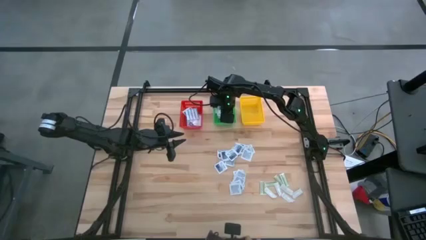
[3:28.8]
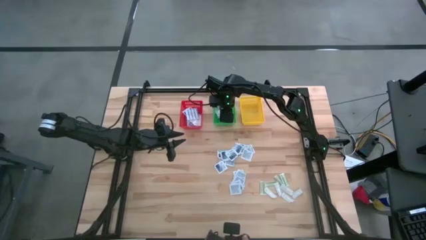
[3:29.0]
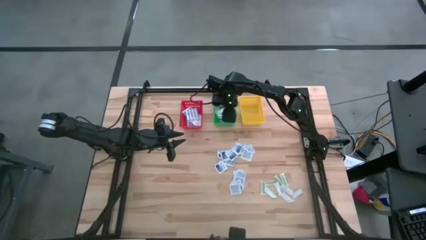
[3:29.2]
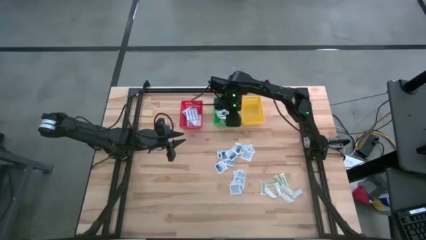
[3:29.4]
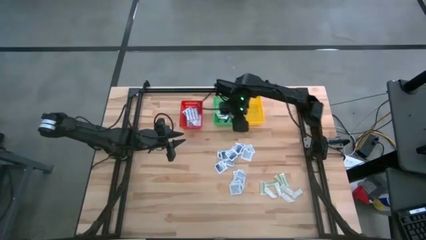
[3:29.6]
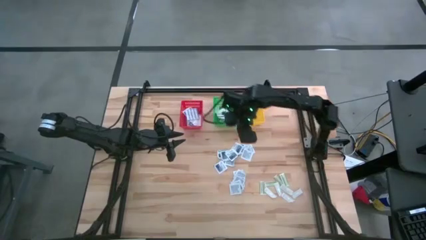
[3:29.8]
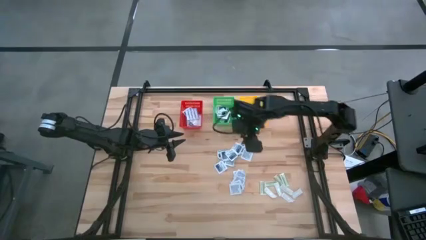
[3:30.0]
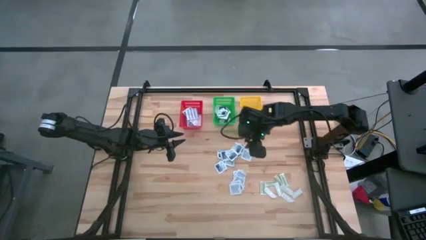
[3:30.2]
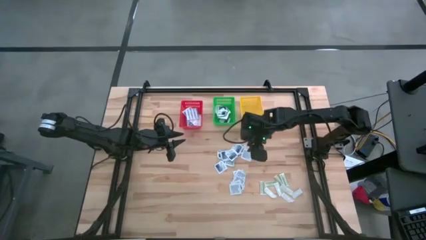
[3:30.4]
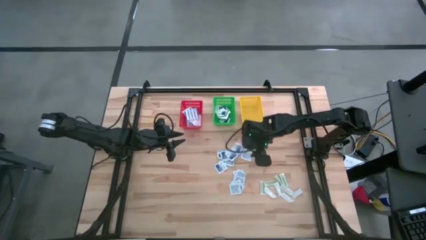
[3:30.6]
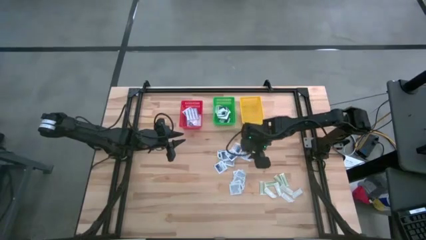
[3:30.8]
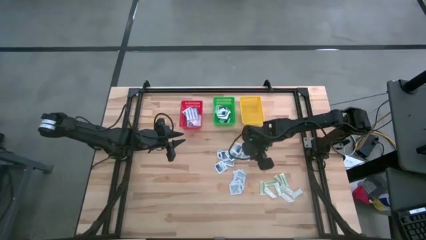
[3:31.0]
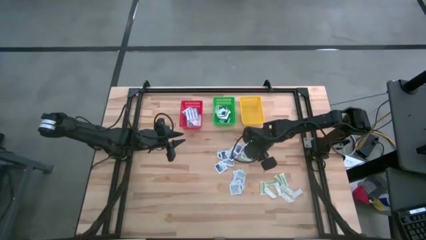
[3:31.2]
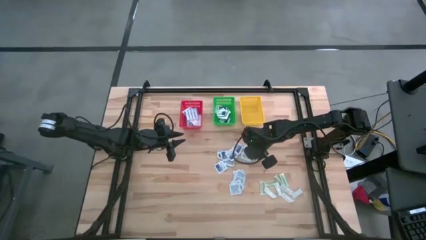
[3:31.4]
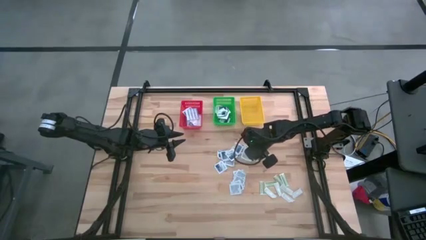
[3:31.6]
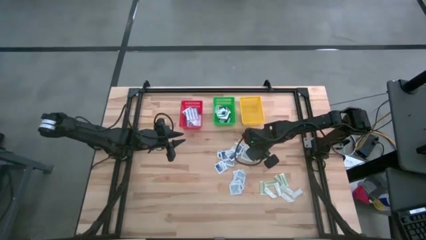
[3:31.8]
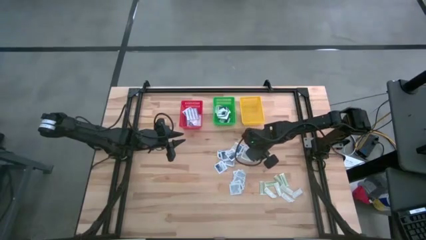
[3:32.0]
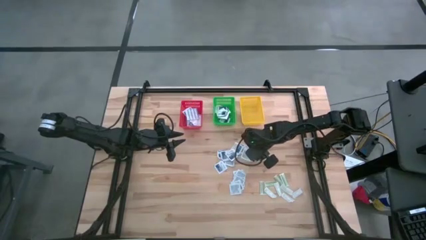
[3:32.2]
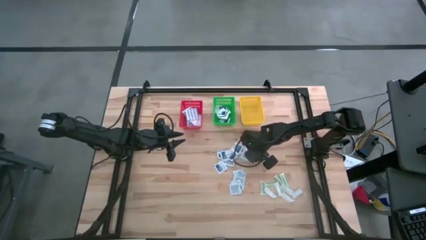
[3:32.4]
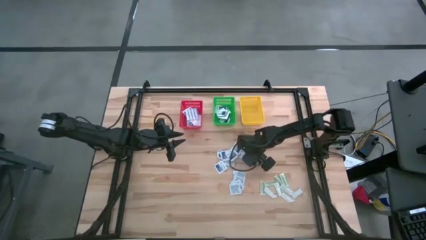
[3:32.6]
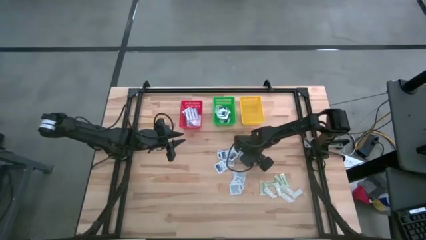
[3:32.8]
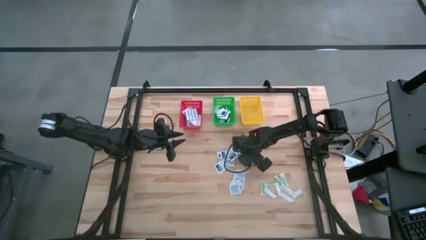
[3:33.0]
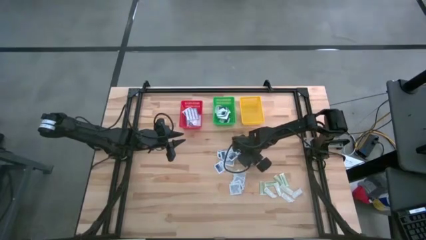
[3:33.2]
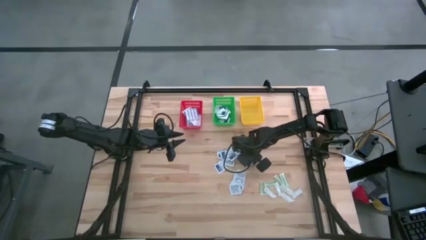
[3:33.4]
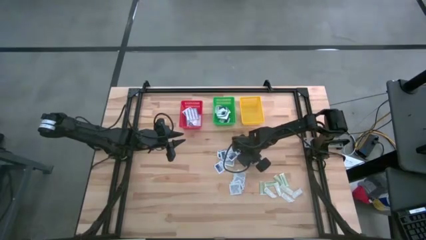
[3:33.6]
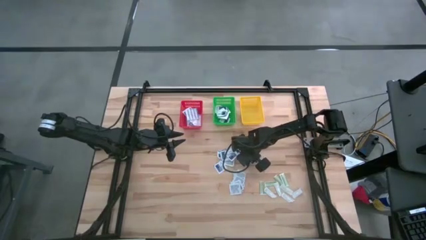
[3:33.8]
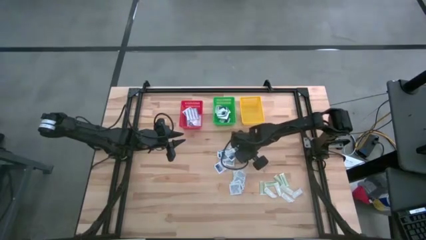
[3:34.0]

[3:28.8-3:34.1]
Task: Pick & Place First Aid Supplies
Put the alcohol pad into the green basket

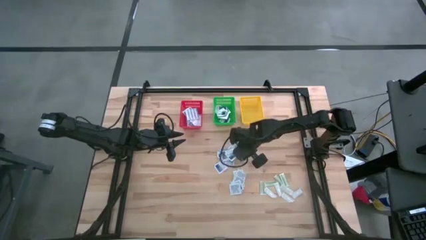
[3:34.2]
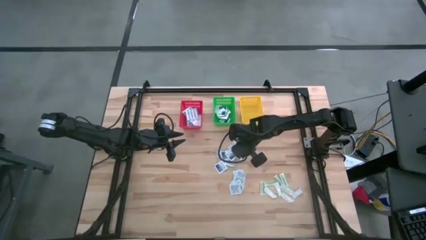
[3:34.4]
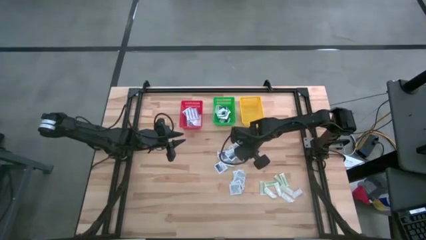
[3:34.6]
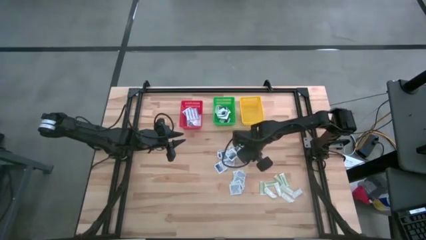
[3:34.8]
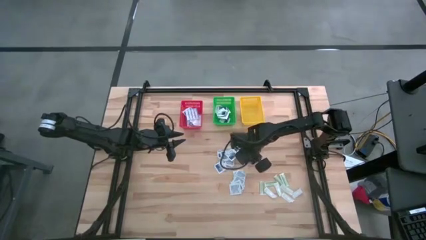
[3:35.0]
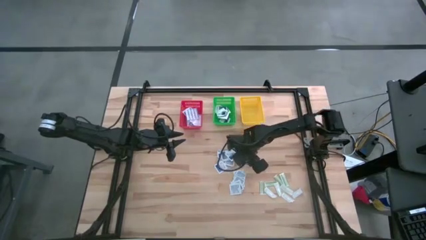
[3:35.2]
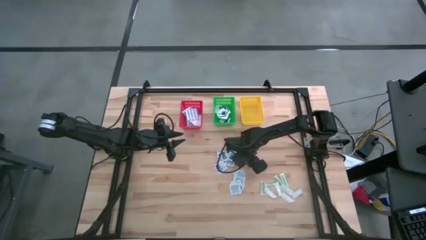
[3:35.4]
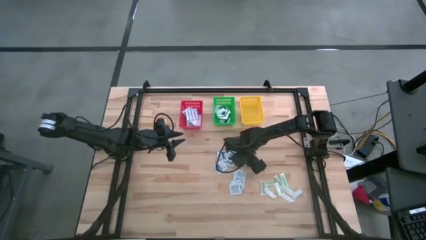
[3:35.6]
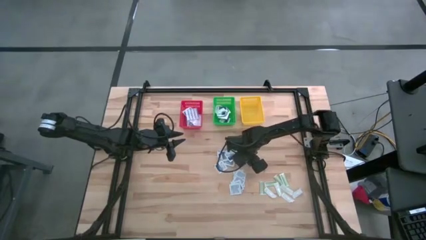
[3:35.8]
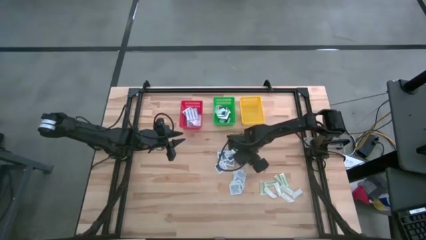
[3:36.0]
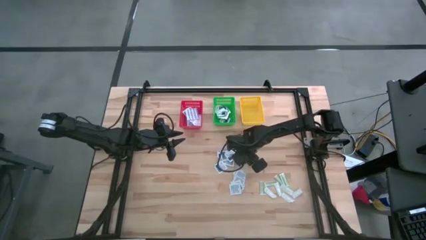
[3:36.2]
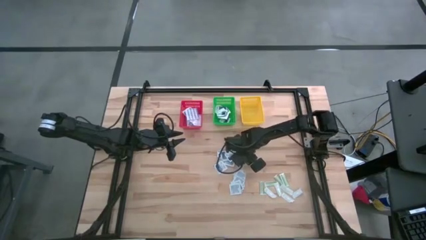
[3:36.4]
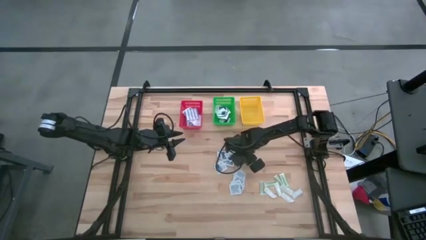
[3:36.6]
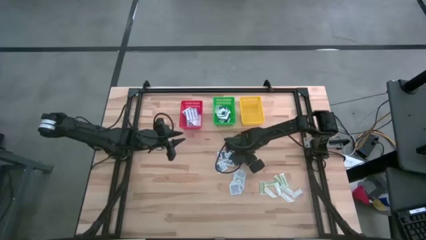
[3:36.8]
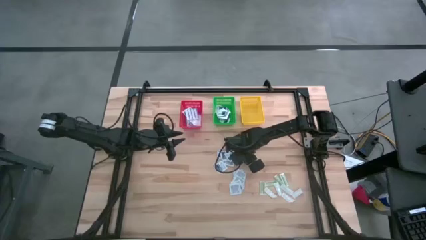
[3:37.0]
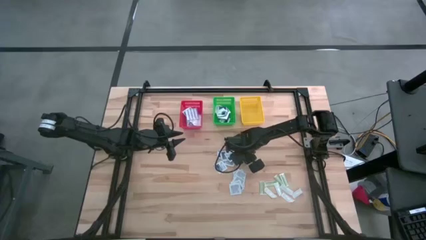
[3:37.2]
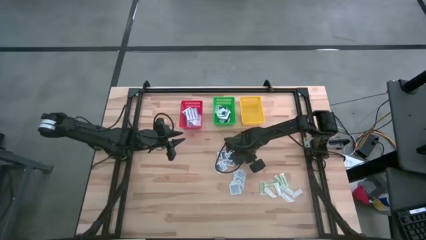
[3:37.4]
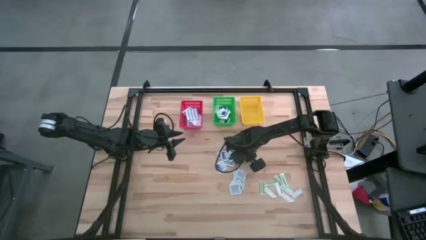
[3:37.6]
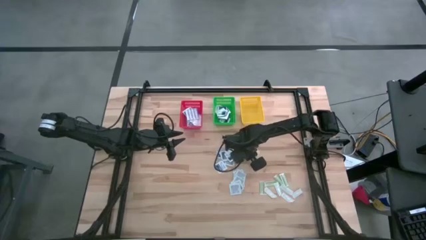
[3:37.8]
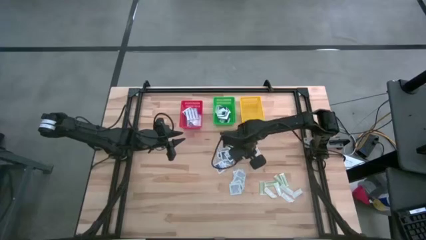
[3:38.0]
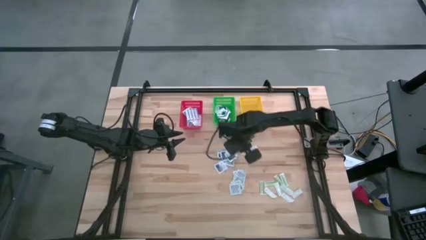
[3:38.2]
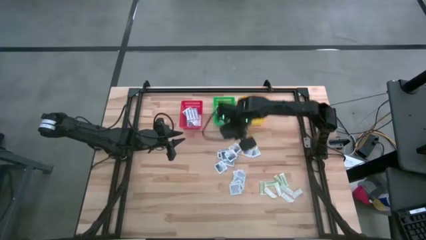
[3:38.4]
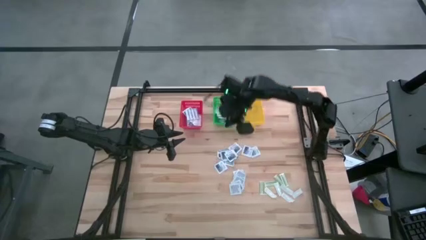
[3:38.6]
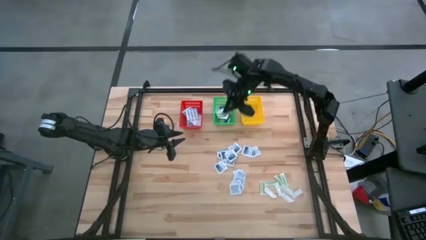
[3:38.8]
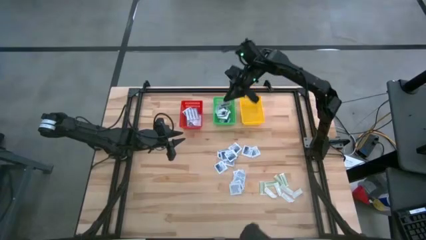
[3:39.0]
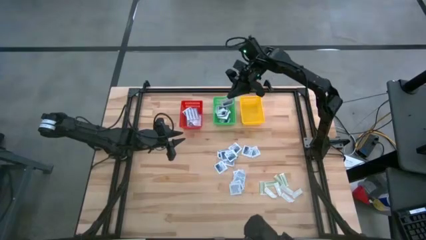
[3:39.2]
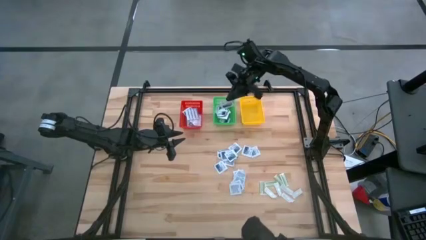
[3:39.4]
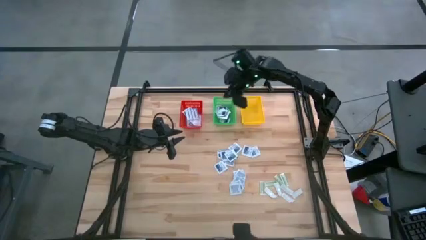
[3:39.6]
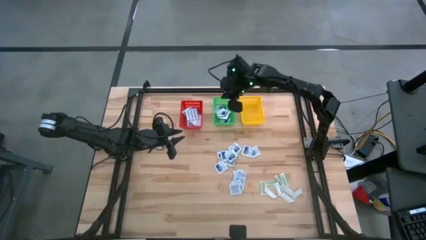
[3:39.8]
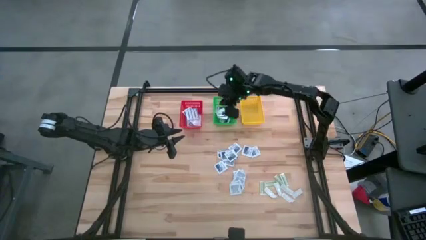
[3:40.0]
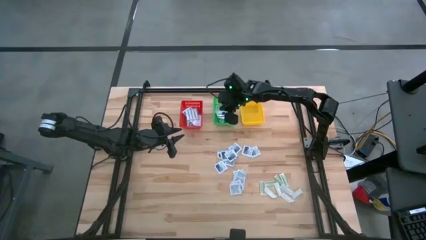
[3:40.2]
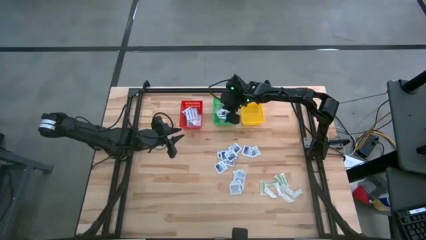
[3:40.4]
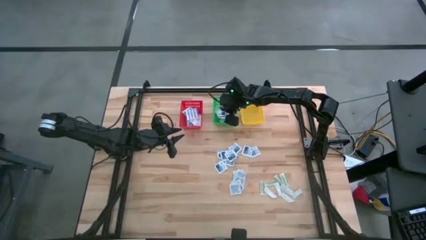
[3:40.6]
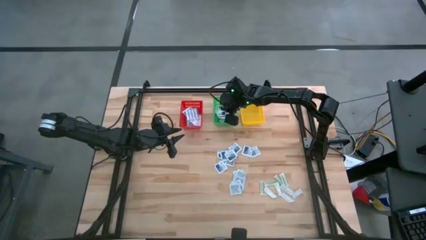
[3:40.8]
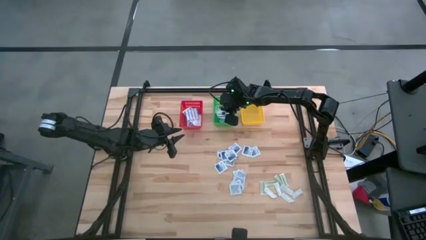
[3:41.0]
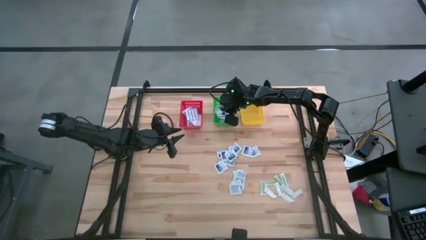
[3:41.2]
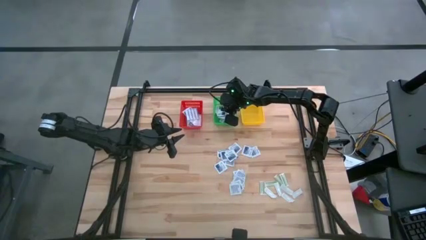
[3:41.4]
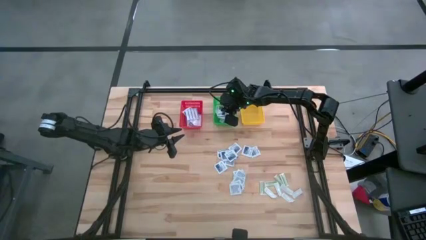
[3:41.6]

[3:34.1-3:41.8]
Put the alcohol pad into the green basket

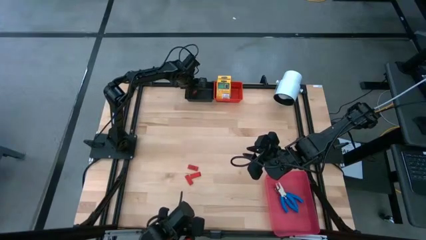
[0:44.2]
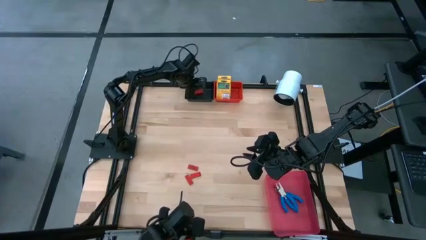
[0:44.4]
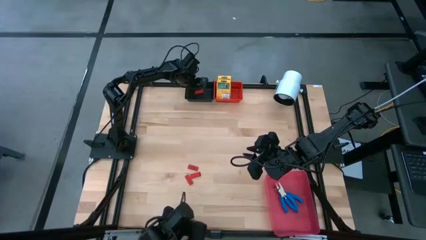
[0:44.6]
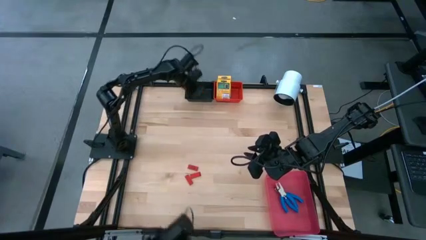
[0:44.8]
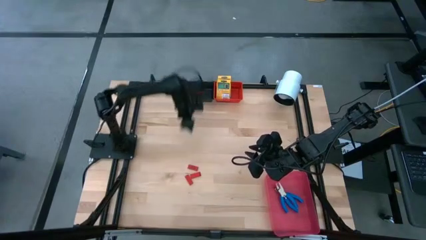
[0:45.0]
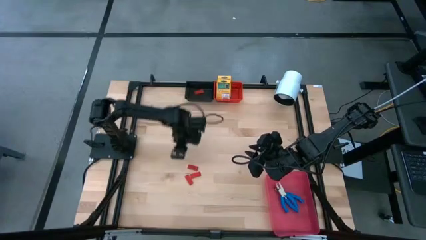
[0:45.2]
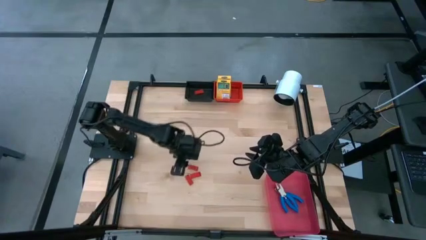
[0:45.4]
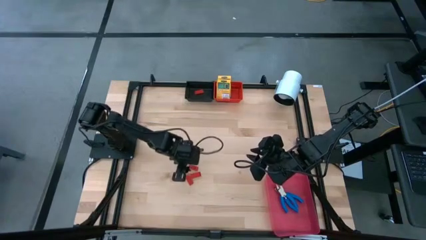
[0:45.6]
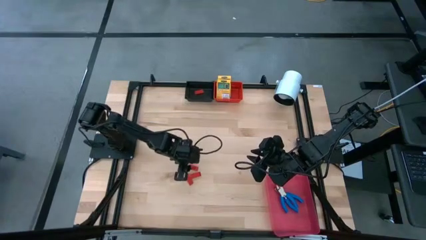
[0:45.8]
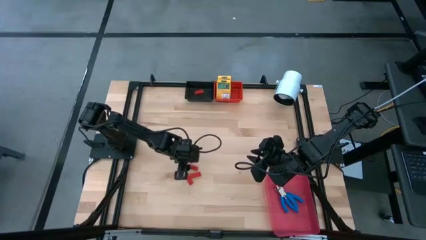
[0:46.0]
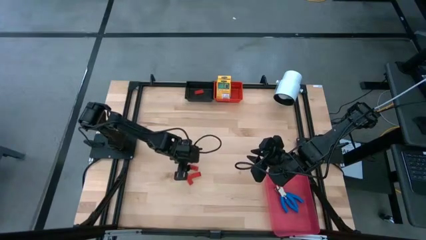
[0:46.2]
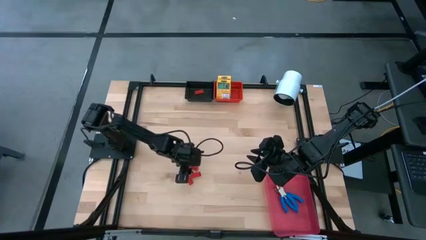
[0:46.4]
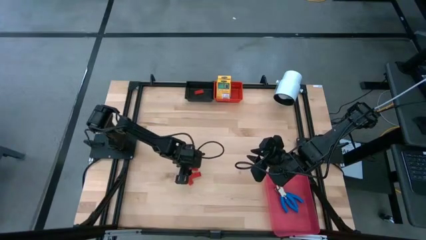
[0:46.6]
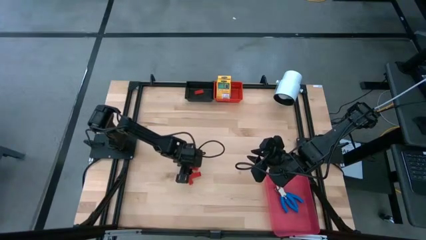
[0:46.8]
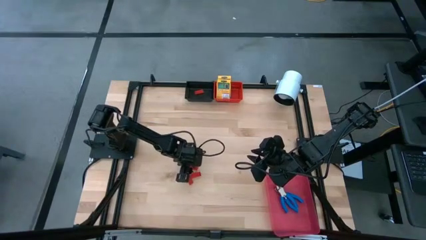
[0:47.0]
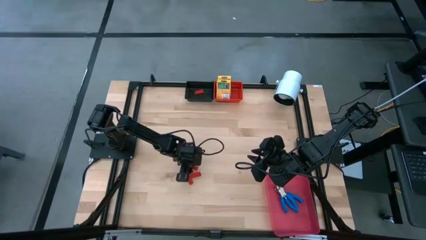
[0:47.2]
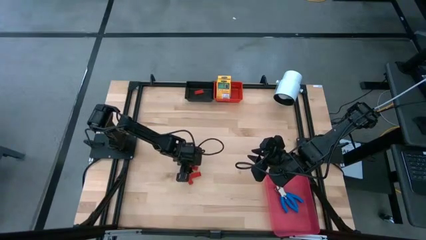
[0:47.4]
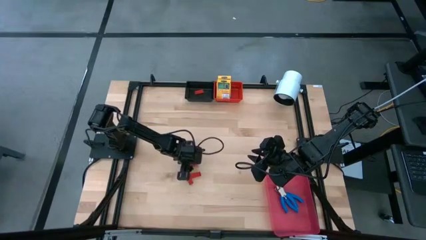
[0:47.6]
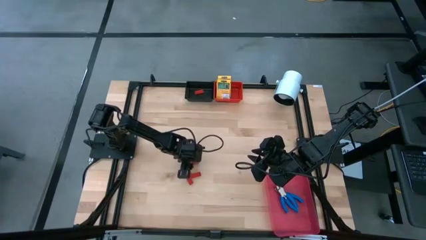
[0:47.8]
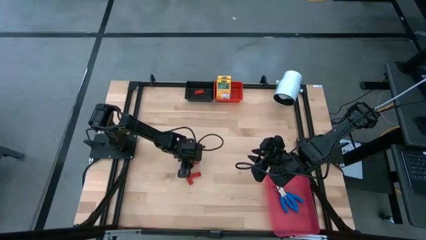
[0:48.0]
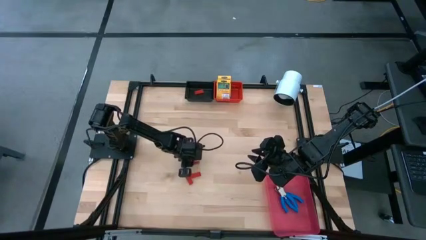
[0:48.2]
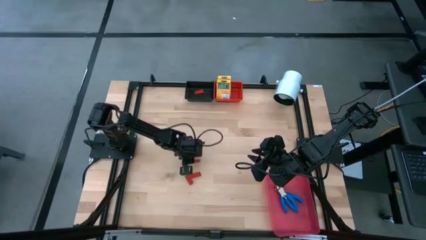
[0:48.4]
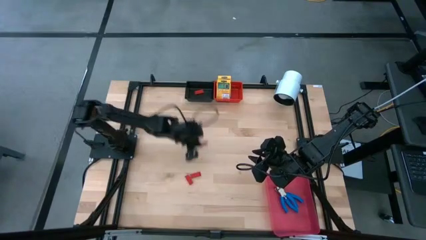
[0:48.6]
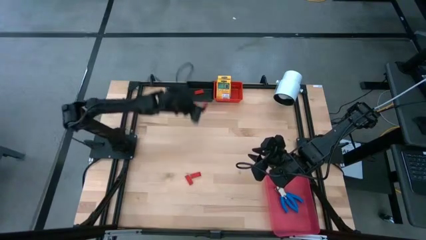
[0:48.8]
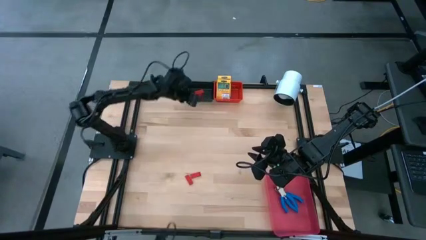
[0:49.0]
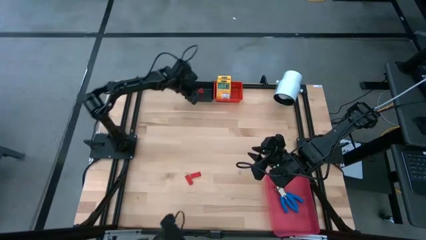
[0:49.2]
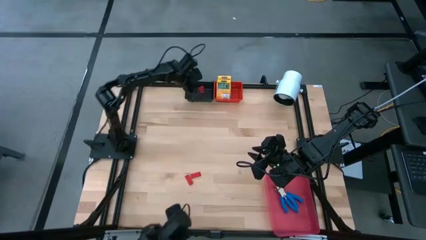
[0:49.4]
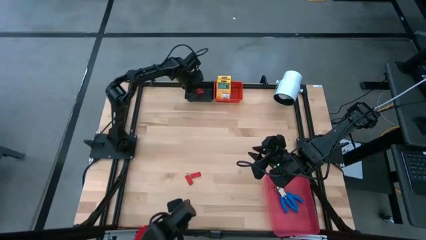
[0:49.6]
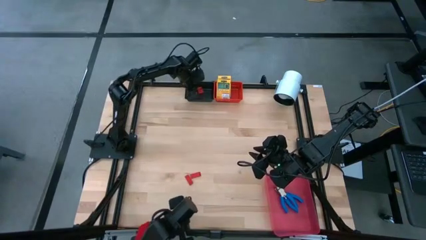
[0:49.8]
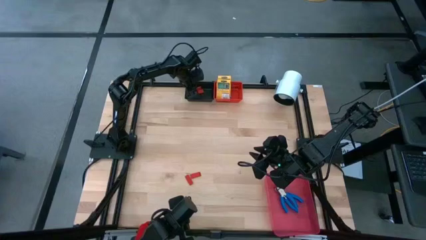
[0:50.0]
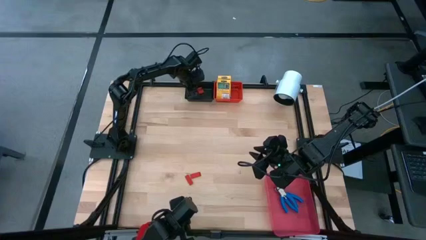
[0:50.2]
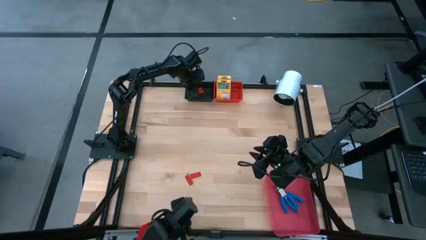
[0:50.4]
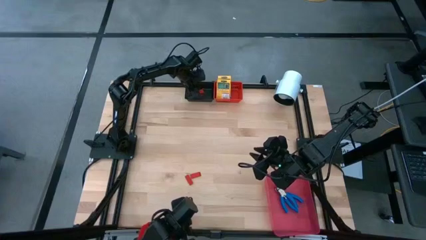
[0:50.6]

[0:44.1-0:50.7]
Task: Pick & Place School Supplies
Put the red eraser into the black bin
